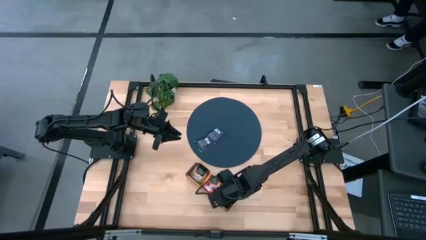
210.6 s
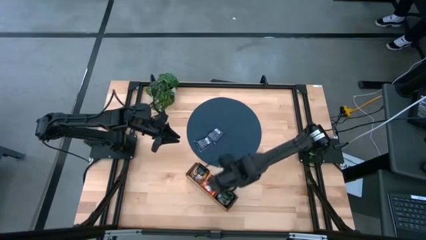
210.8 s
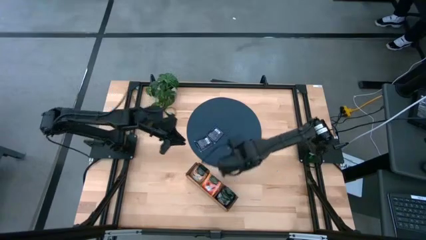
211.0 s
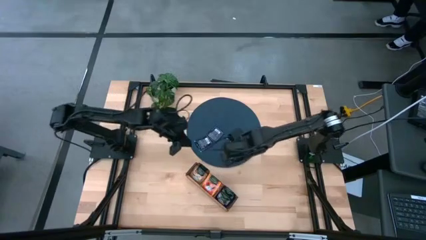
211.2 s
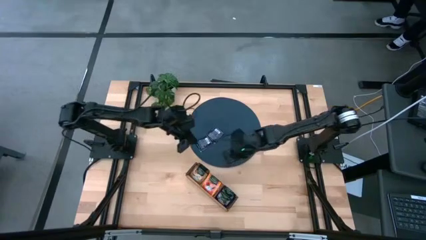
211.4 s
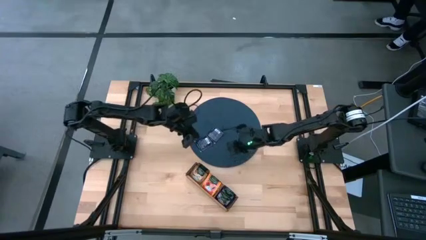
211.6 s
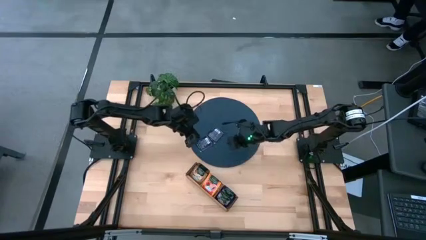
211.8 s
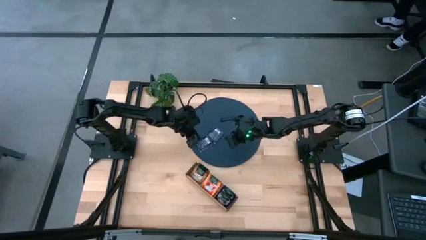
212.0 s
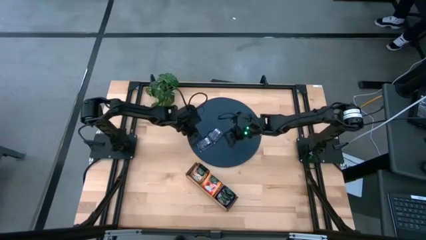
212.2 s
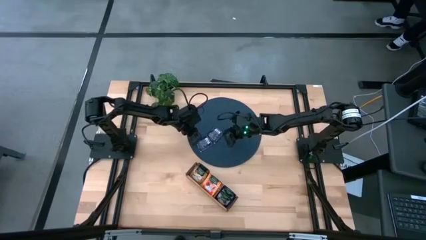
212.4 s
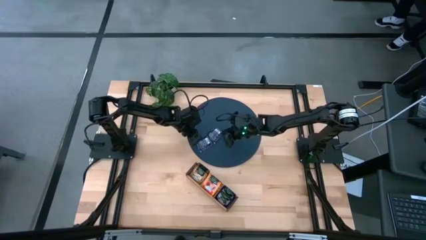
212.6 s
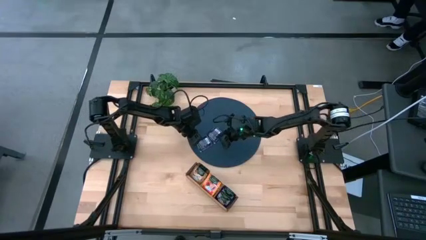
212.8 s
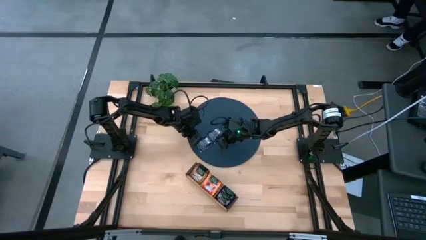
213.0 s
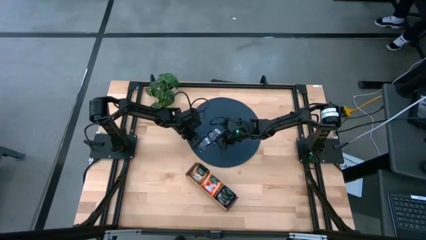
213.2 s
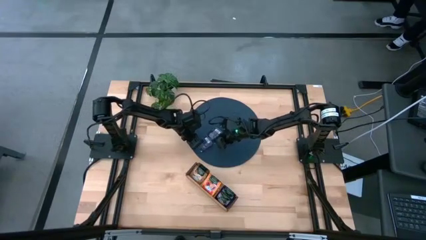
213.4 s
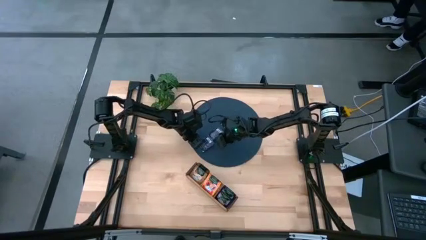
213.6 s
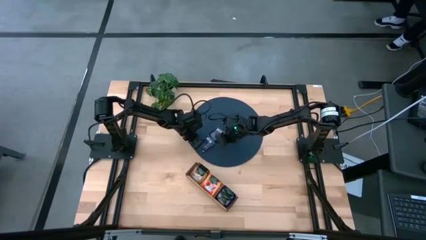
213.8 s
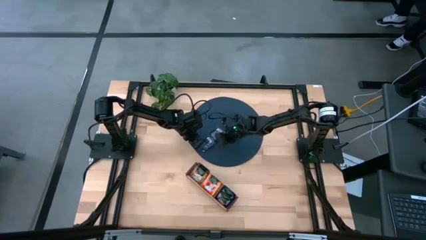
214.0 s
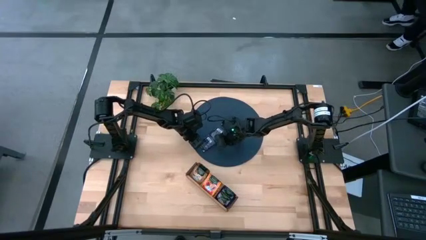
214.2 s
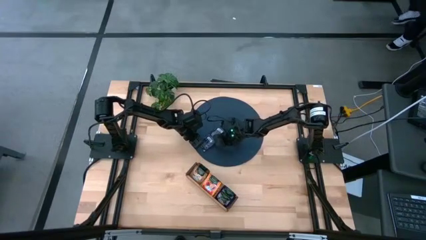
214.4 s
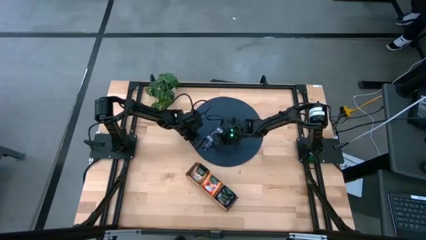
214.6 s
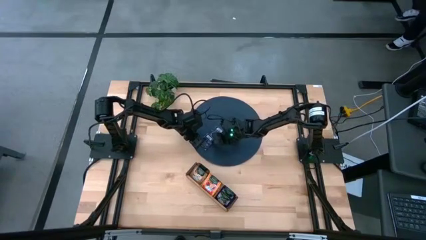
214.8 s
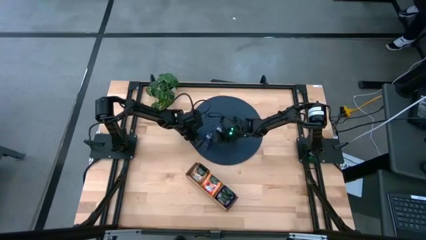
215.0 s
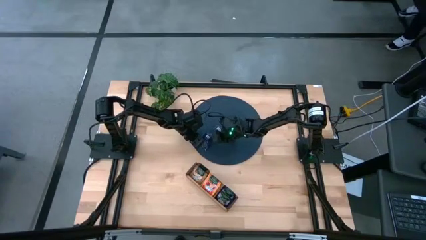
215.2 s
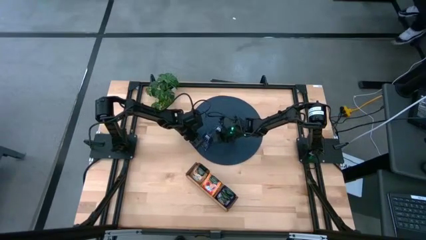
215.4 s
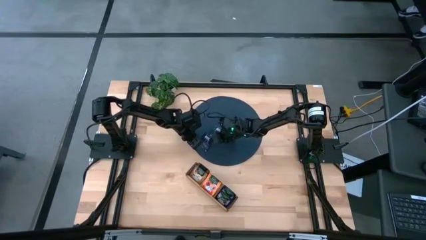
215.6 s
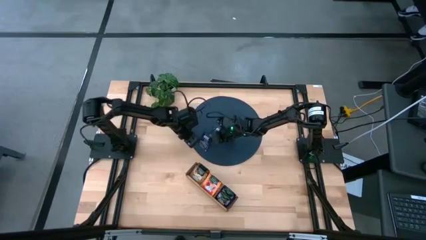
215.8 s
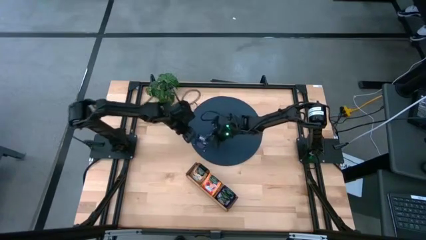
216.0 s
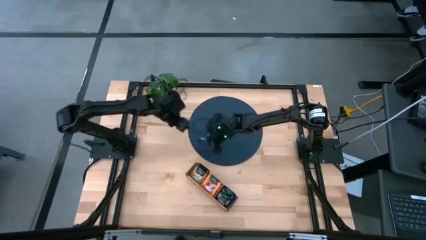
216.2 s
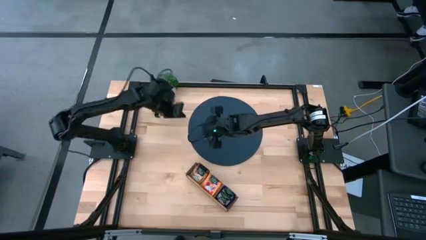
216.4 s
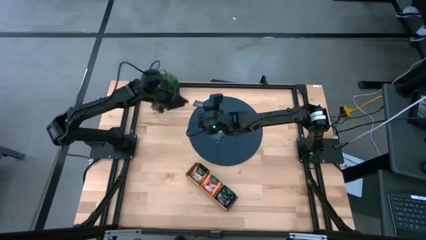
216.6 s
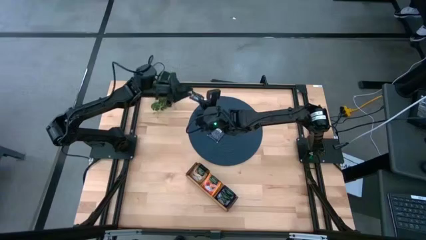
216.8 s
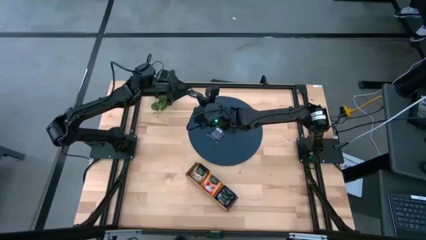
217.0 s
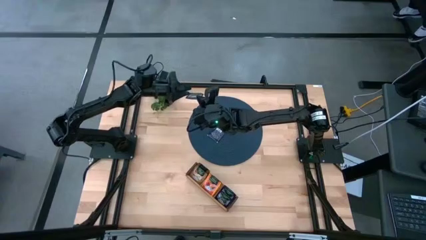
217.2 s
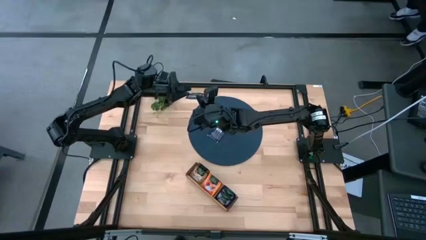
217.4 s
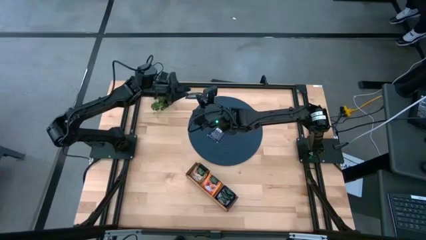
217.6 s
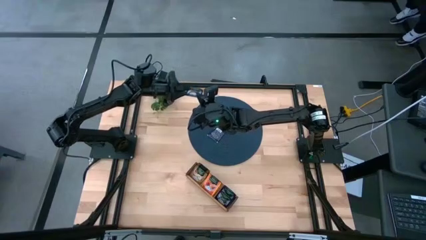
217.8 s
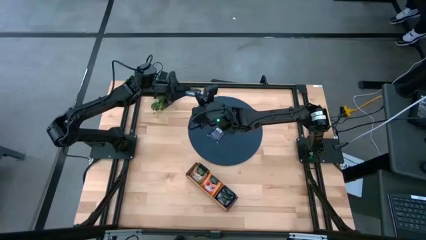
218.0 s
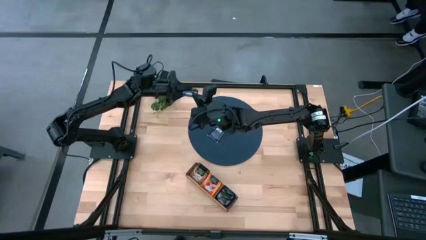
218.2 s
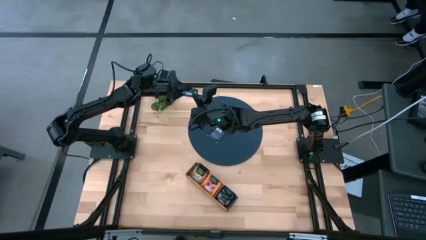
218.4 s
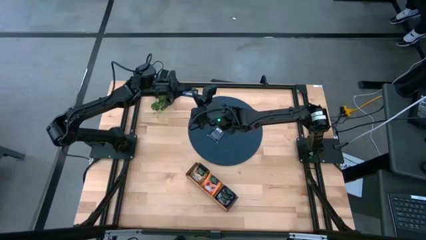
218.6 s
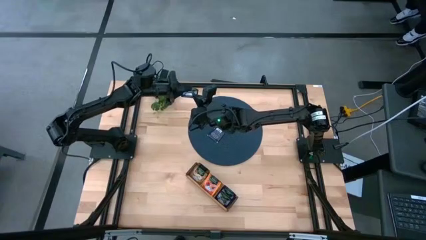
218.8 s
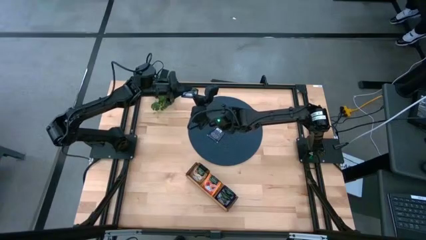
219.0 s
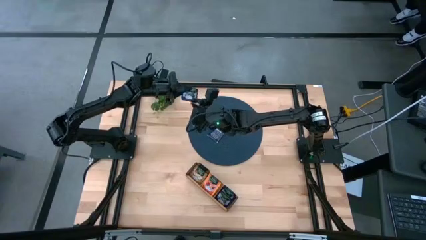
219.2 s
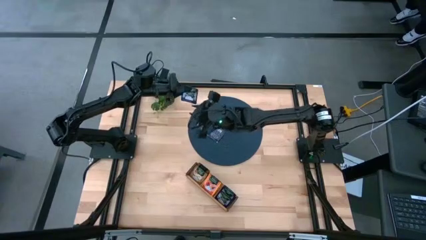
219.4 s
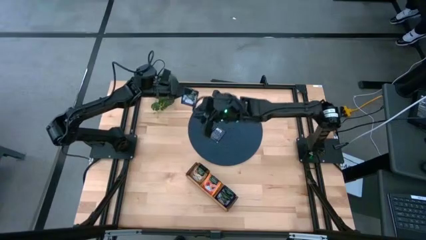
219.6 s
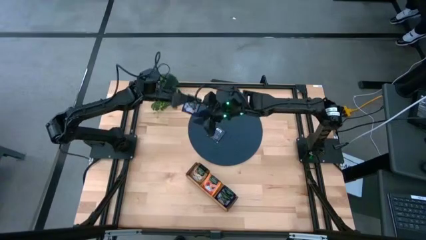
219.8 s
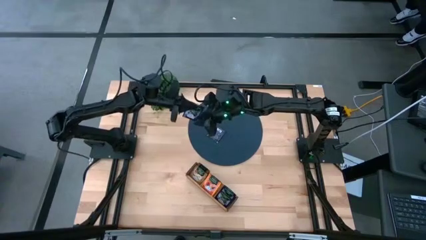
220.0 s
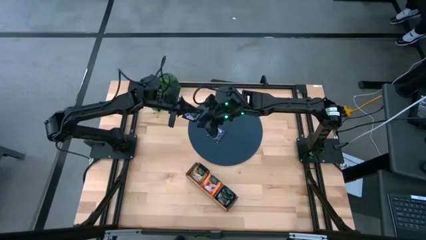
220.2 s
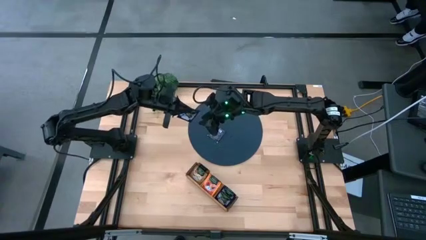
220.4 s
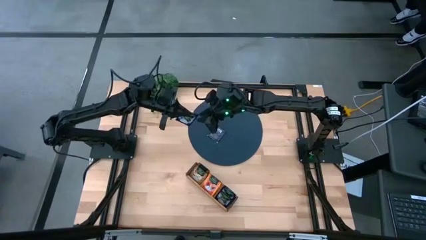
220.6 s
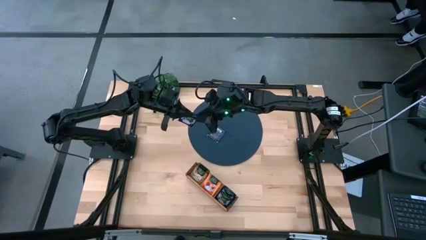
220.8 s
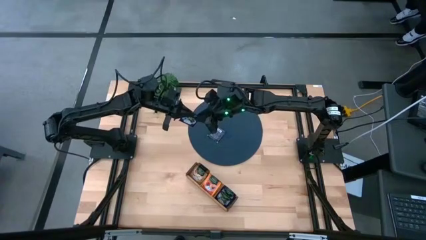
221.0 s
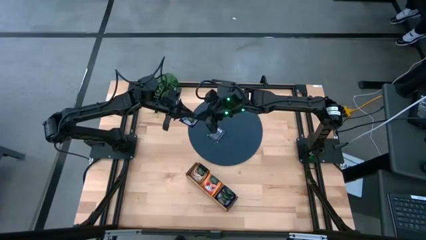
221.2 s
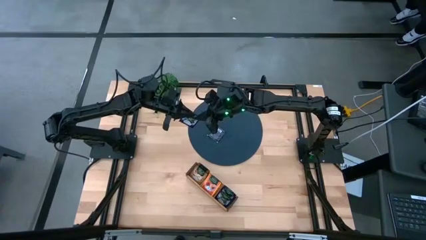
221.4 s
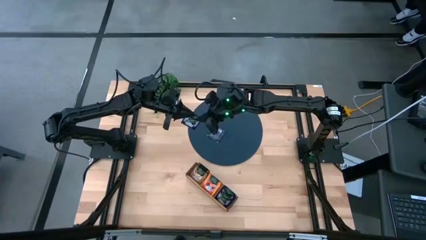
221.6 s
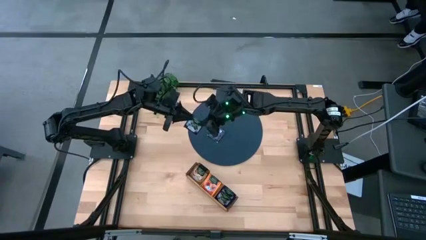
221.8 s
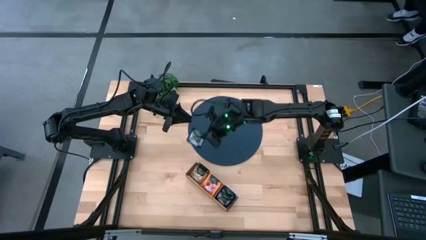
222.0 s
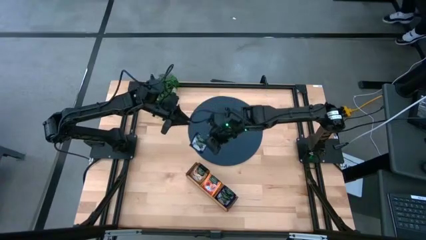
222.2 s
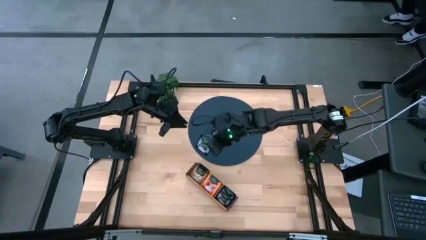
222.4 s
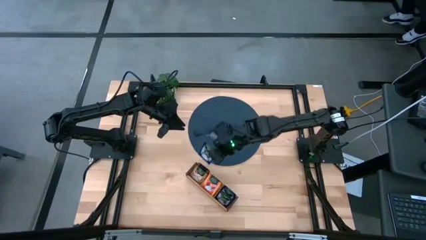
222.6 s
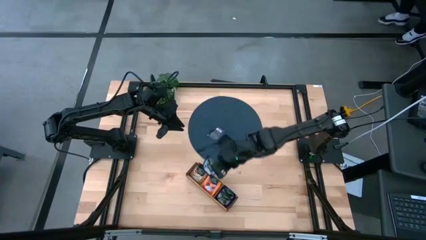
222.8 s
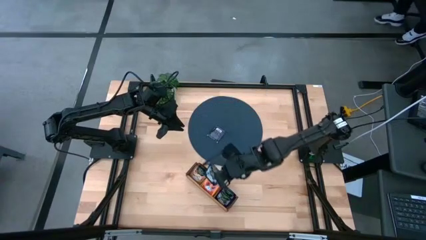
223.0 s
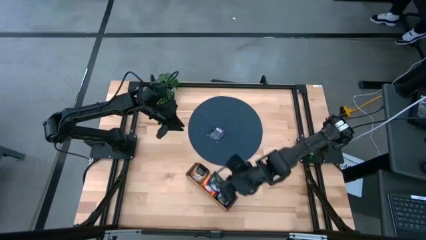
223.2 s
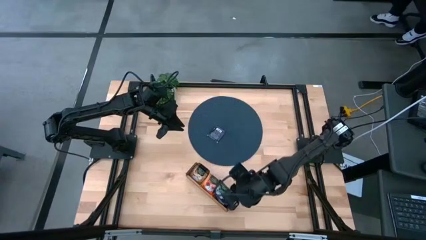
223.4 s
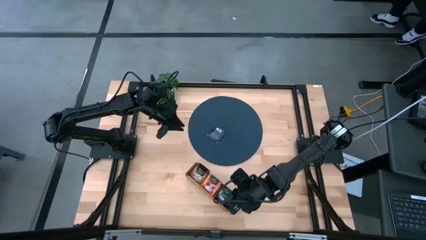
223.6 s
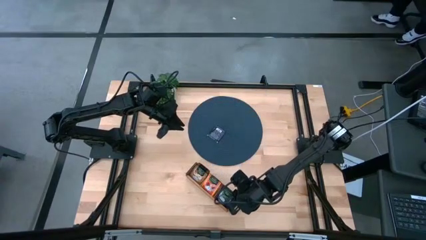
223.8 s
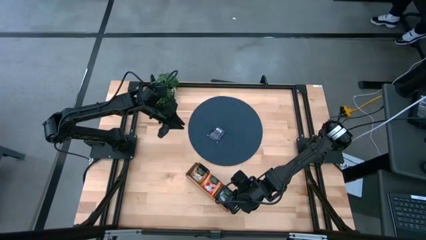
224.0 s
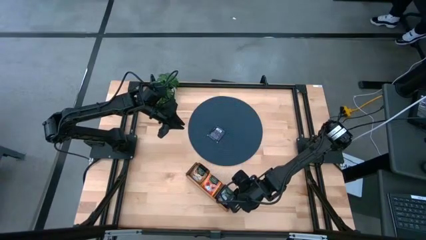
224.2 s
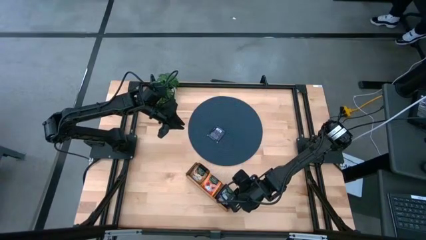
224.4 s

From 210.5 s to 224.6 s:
Task: Pick & Place Tea
Put the violet tea bag into the right section of the wooden organizer

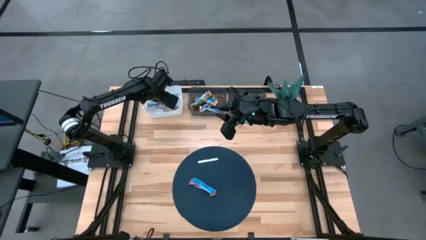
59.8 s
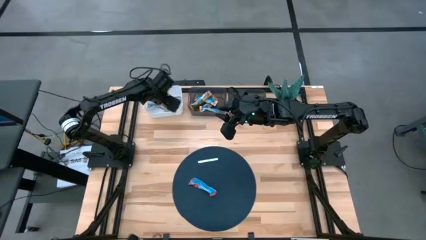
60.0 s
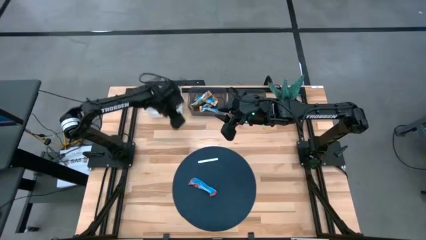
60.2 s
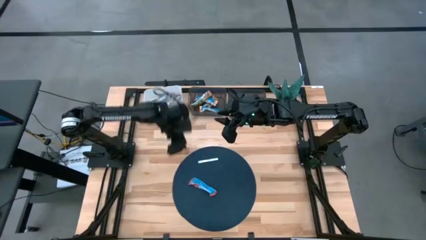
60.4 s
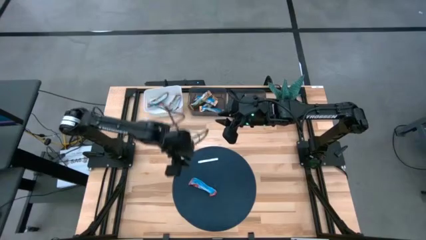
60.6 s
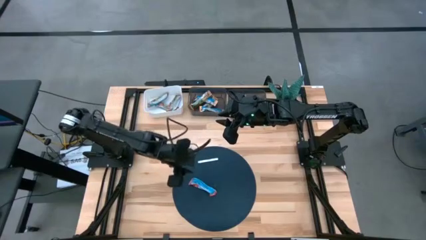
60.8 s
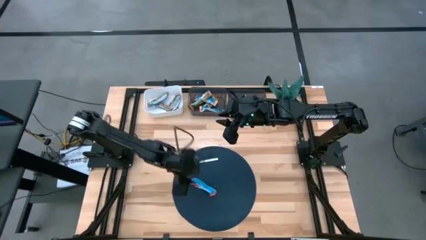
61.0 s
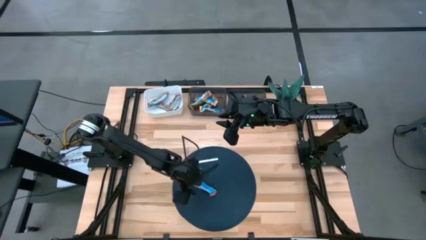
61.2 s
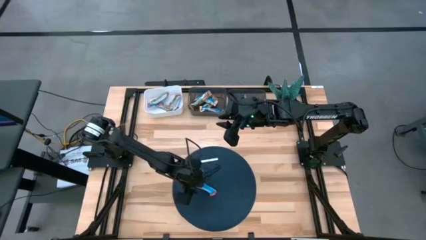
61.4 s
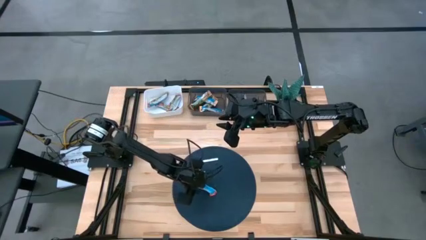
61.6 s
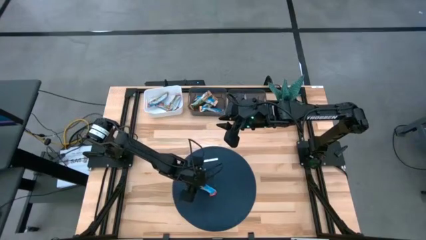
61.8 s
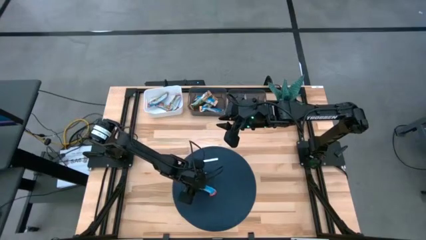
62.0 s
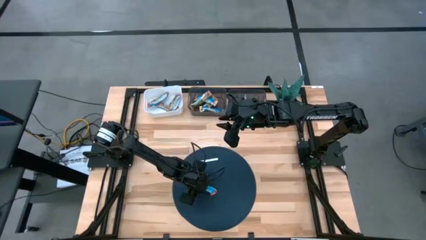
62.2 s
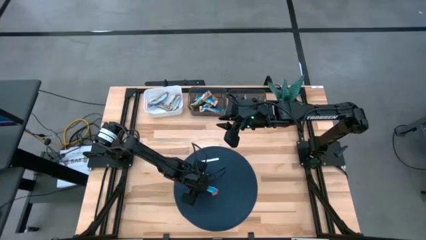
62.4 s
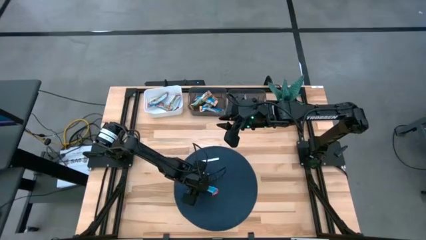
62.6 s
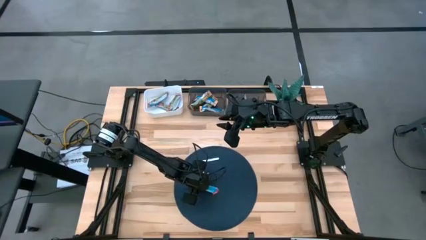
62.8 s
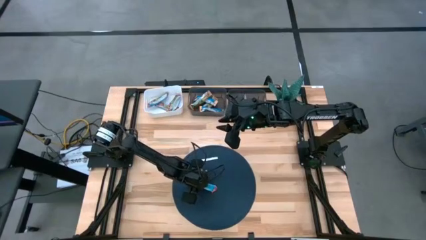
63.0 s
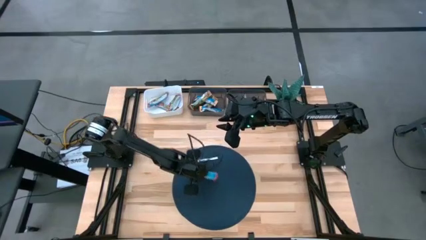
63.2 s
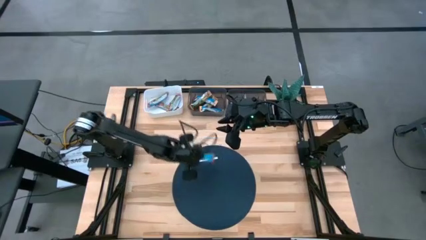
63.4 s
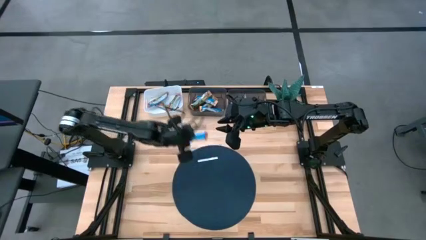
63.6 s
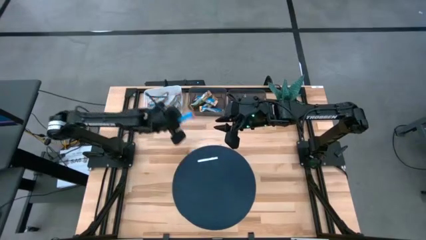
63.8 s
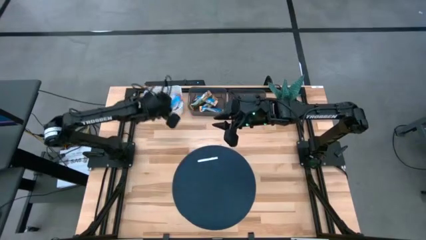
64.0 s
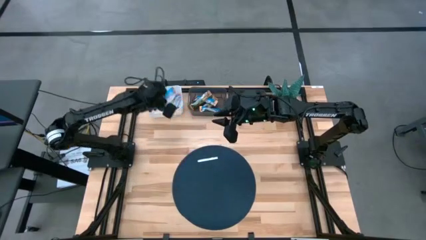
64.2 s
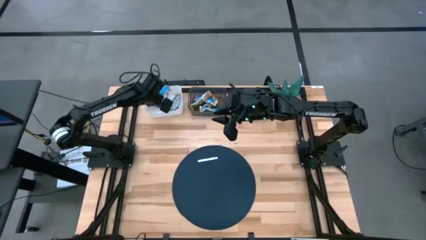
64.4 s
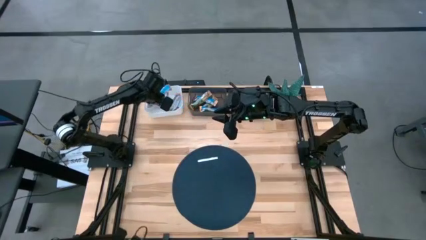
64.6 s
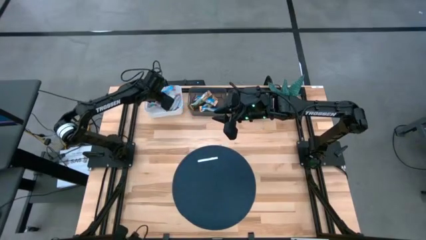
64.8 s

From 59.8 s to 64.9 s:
Task: Pick and place Granola Bars by type
Put the red granola bar into the white bin
